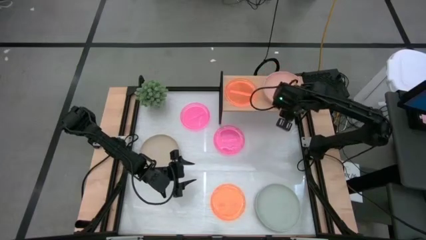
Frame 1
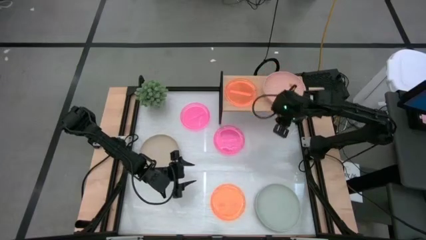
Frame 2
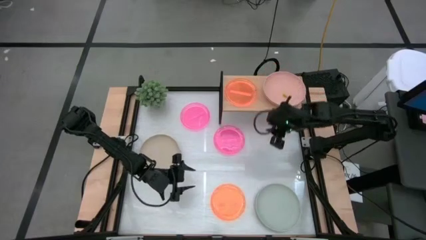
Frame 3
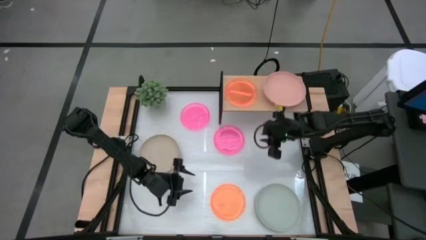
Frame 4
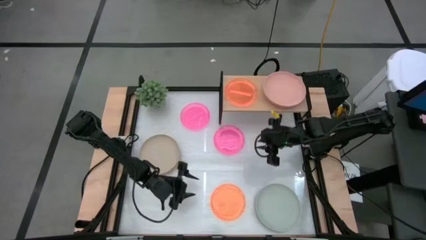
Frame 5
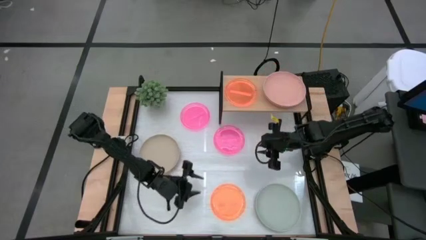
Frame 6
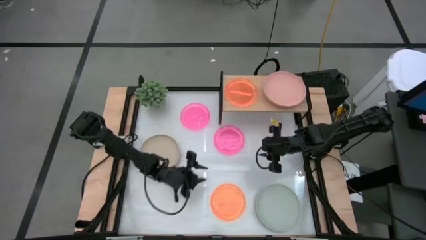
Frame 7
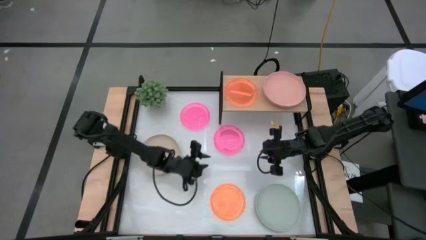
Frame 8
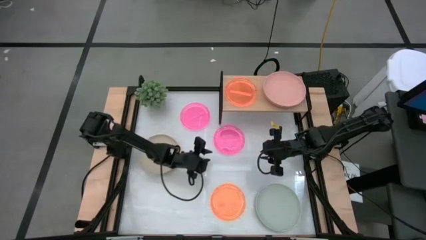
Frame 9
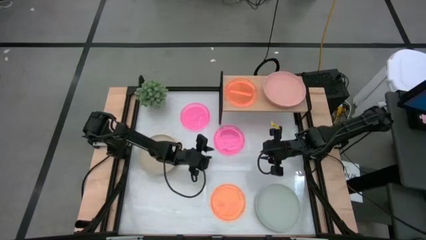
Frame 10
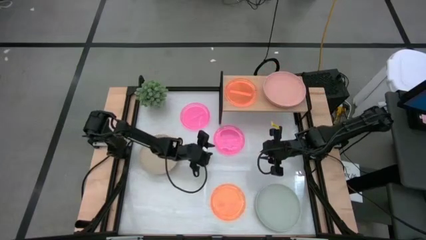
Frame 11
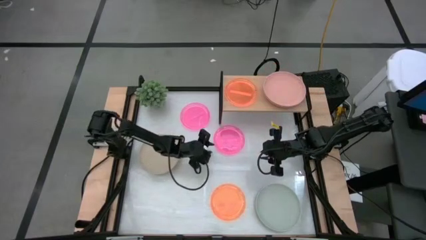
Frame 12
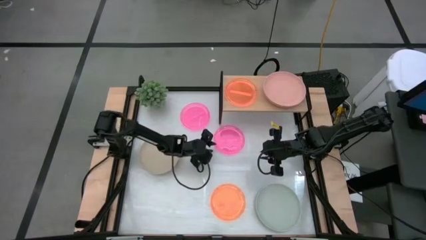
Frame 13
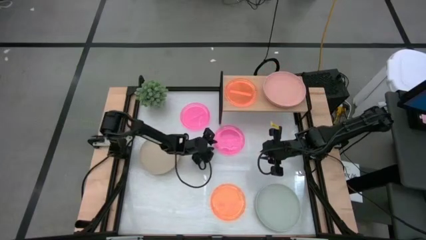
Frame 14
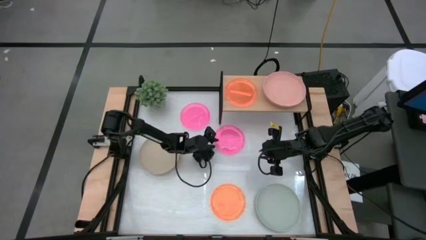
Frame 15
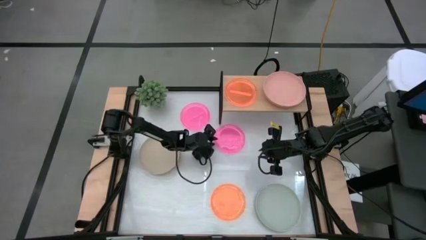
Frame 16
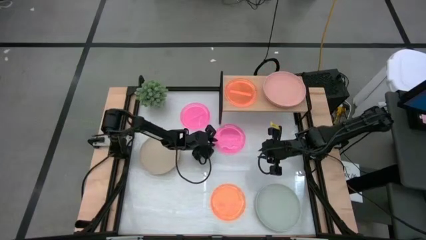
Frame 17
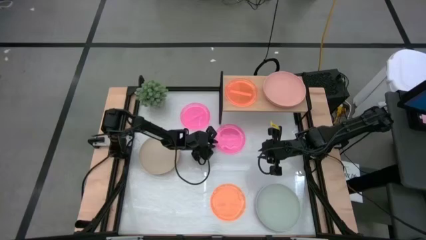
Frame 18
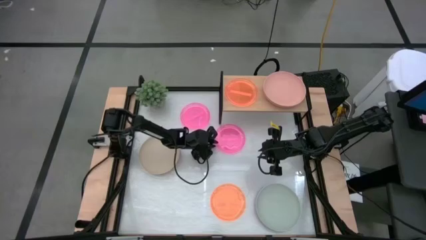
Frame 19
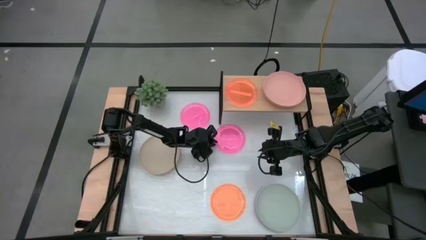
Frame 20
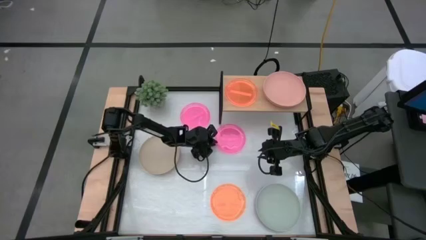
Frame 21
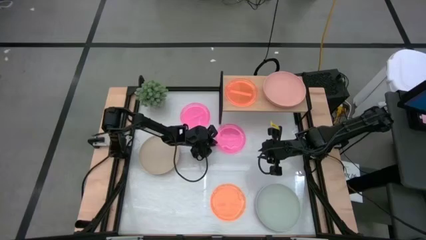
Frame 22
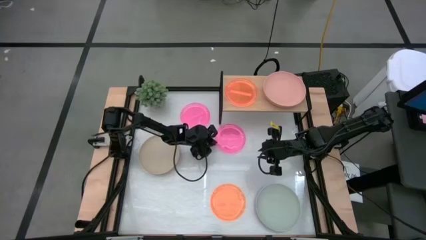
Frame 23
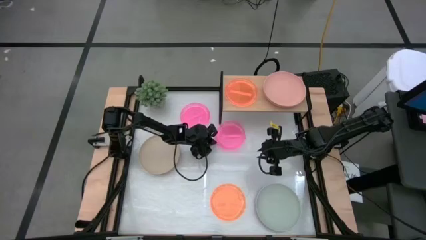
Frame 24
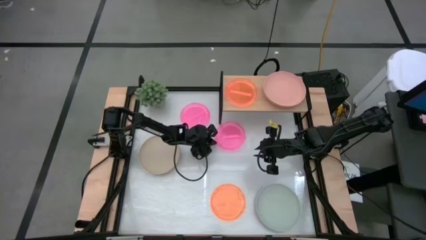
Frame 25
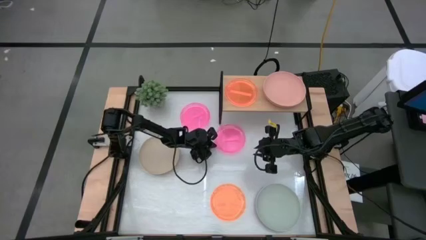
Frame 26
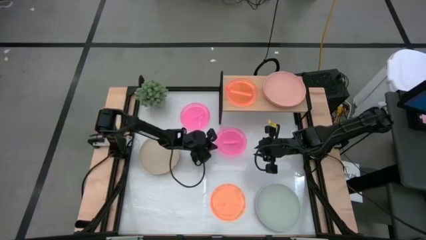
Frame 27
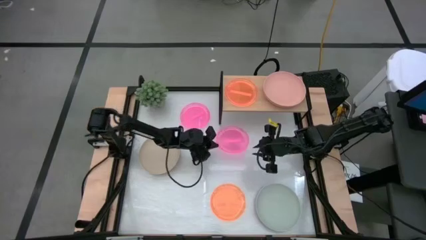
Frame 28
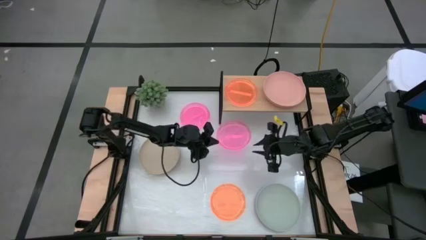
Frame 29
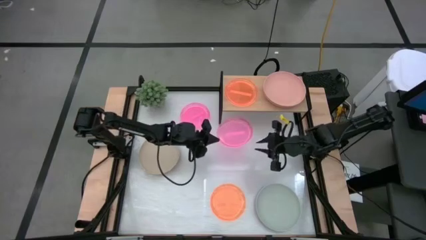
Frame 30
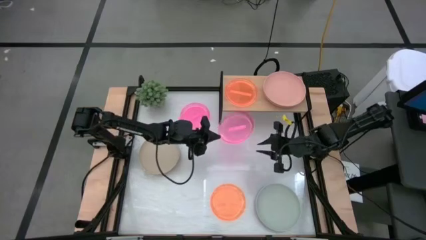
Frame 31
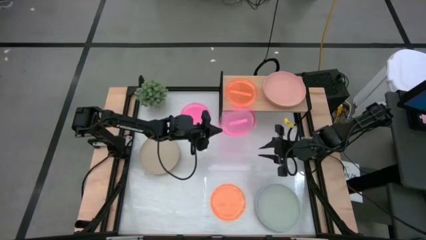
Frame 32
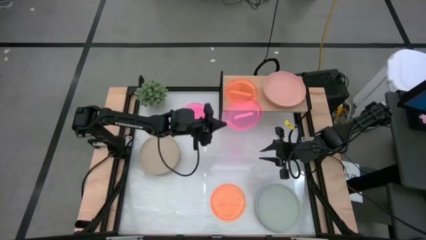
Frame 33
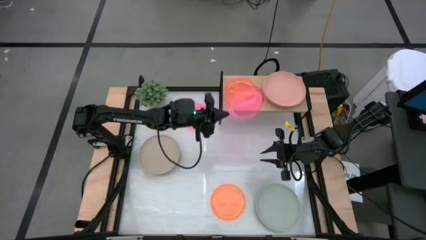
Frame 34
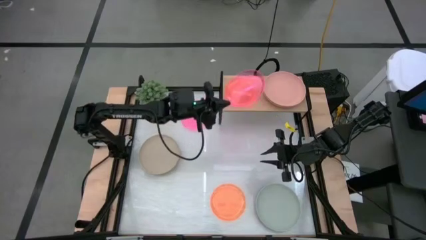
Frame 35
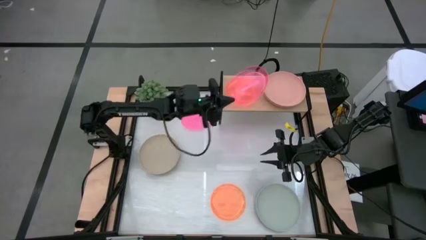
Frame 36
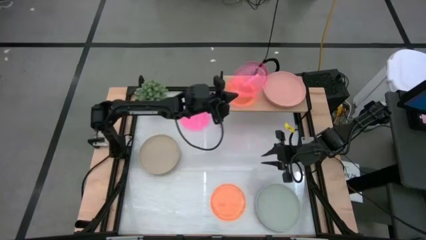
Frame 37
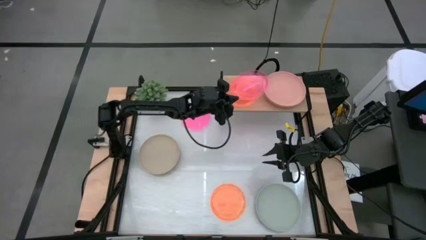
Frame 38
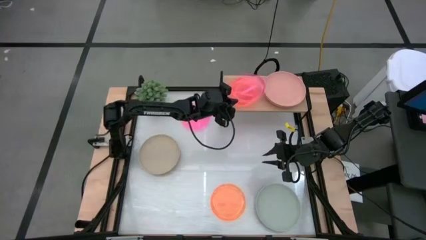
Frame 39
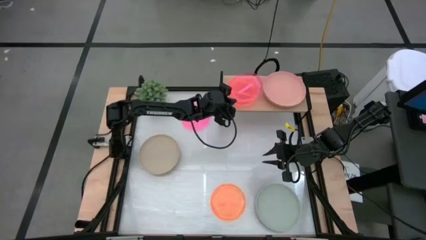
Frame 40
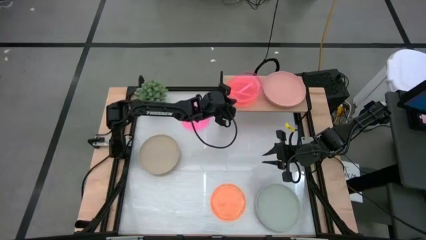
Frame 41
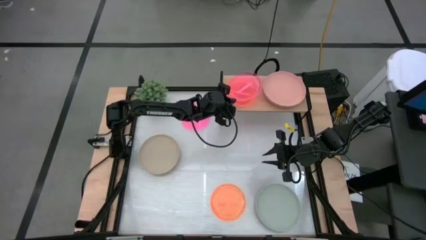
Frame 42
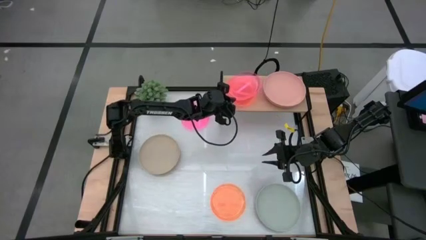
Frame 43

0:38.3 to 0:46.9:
Task: Place and stack plates onto a shelf
Stack the right pink plate on top of the orange plate on the shelf

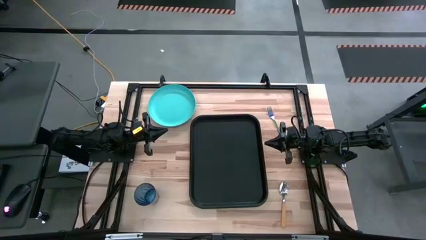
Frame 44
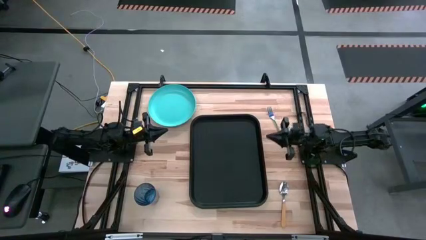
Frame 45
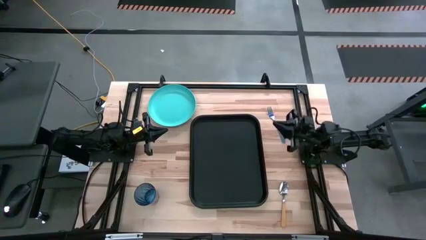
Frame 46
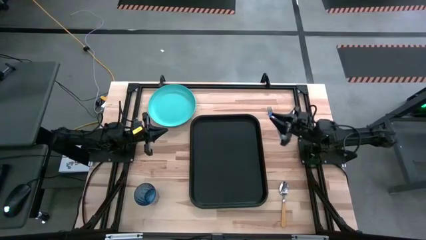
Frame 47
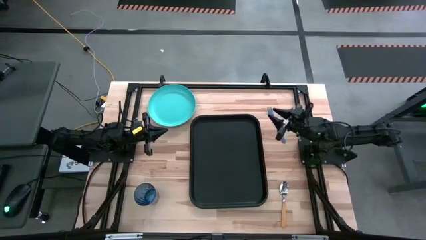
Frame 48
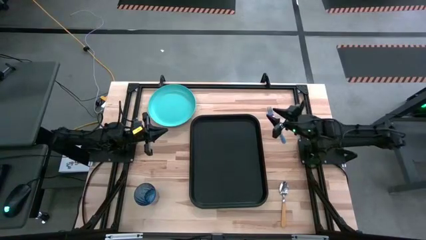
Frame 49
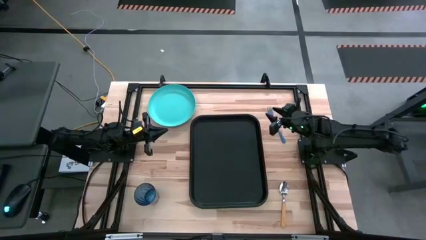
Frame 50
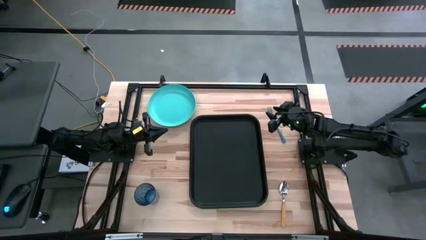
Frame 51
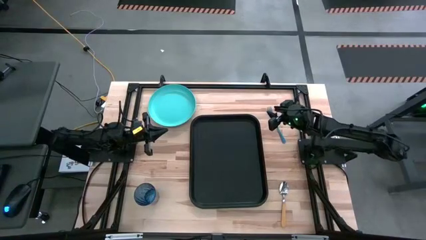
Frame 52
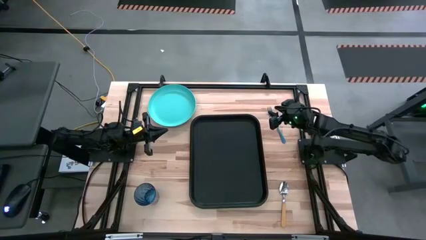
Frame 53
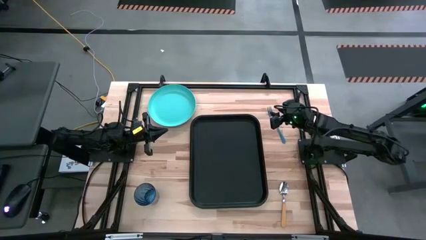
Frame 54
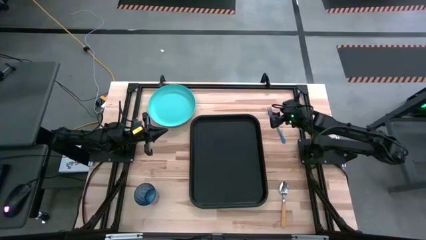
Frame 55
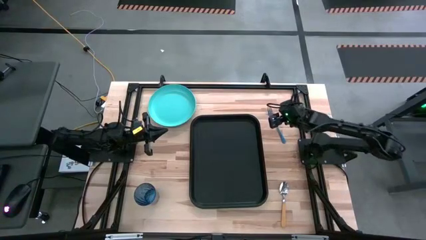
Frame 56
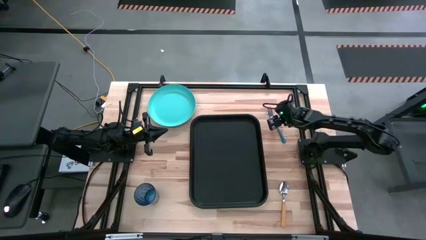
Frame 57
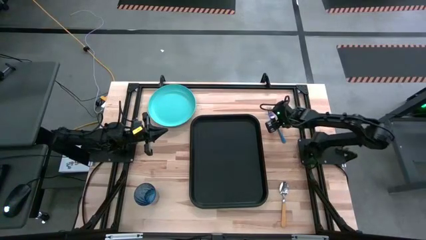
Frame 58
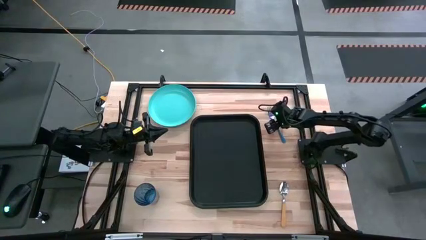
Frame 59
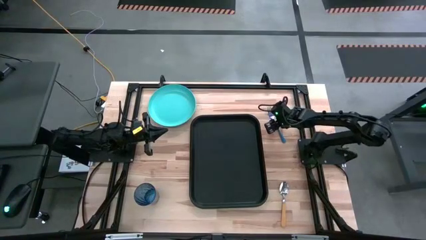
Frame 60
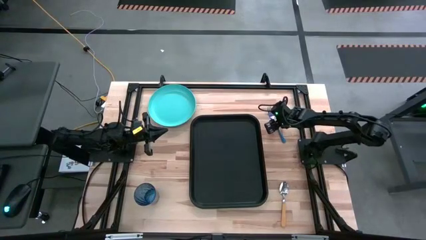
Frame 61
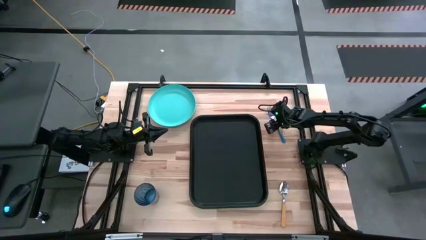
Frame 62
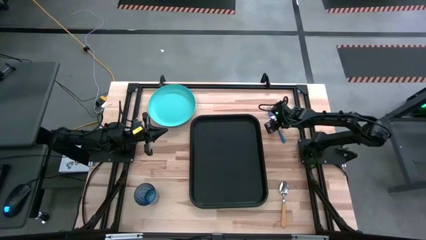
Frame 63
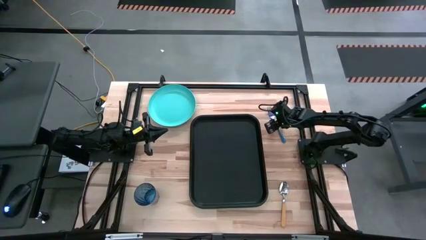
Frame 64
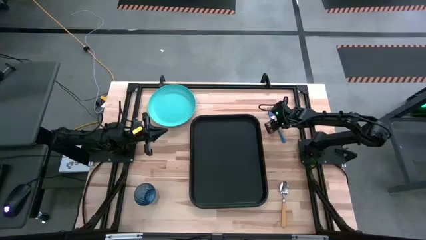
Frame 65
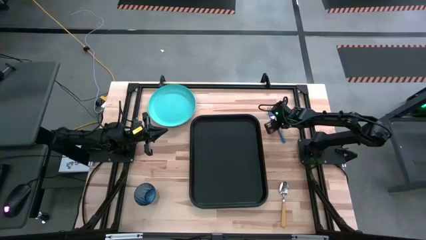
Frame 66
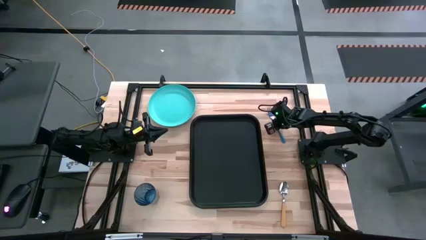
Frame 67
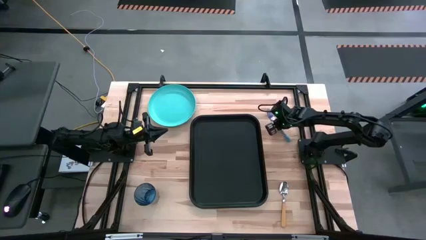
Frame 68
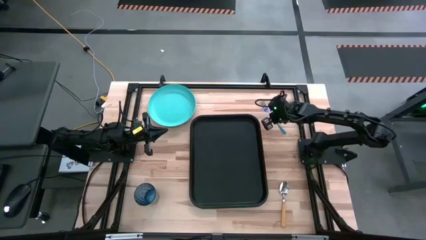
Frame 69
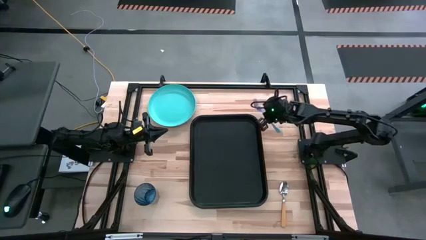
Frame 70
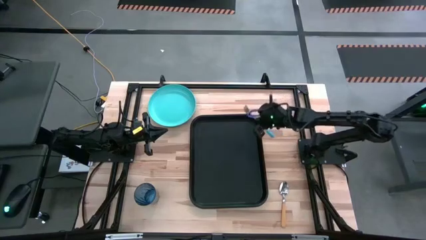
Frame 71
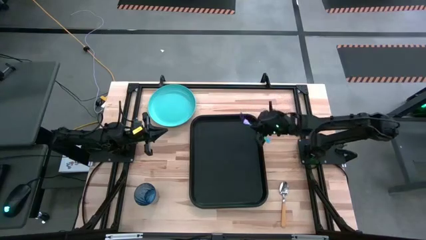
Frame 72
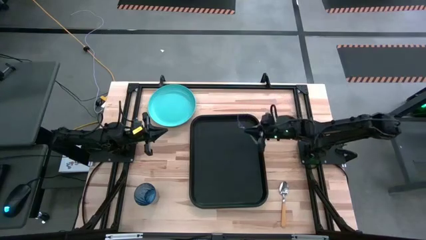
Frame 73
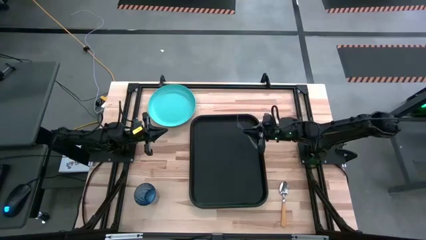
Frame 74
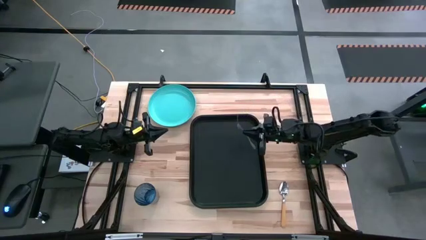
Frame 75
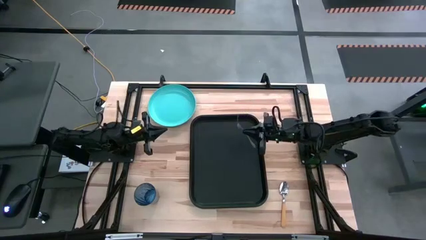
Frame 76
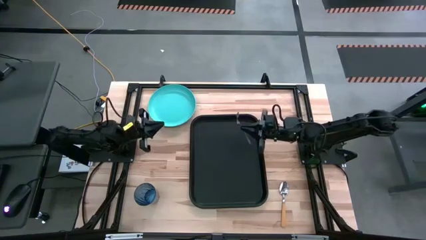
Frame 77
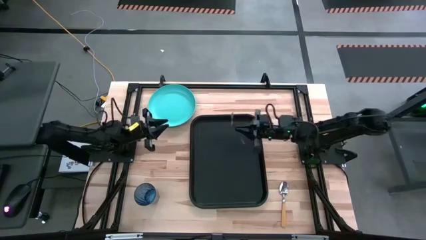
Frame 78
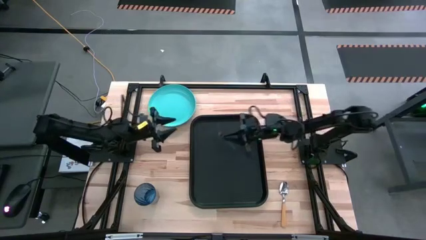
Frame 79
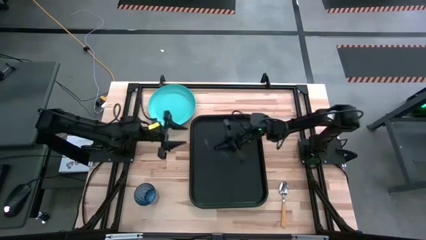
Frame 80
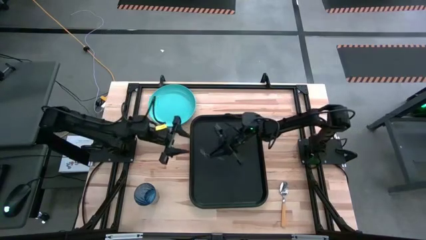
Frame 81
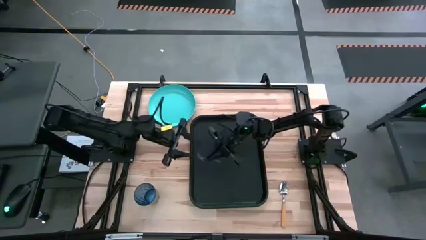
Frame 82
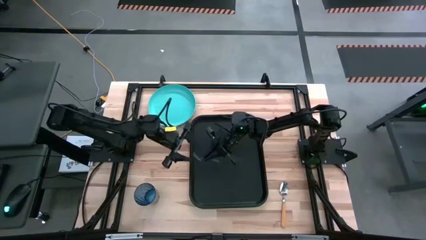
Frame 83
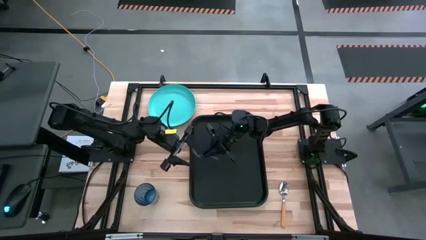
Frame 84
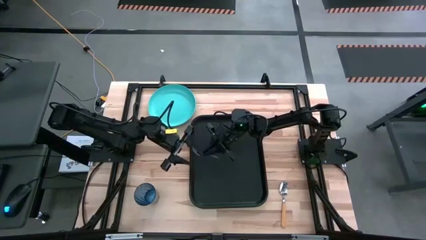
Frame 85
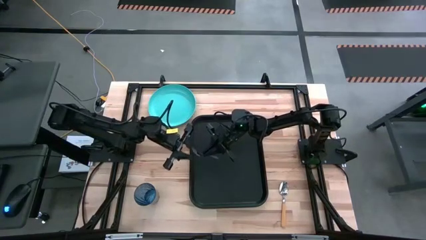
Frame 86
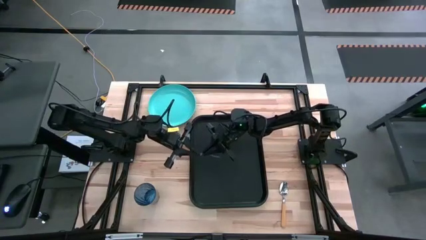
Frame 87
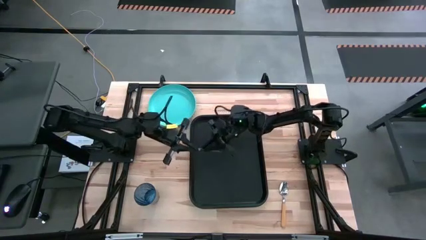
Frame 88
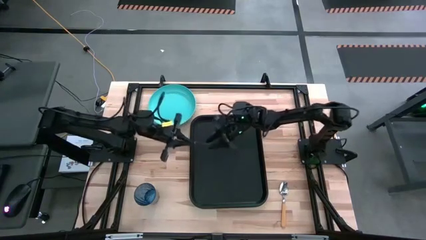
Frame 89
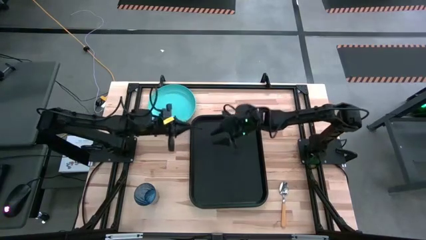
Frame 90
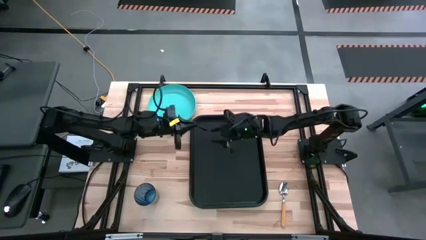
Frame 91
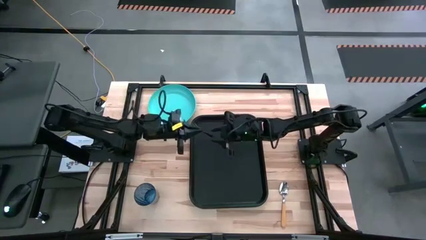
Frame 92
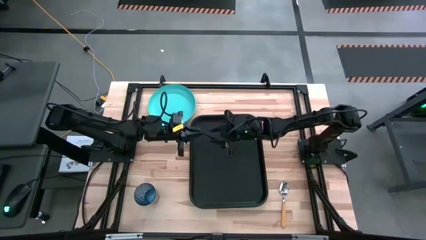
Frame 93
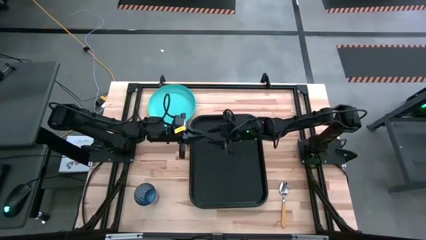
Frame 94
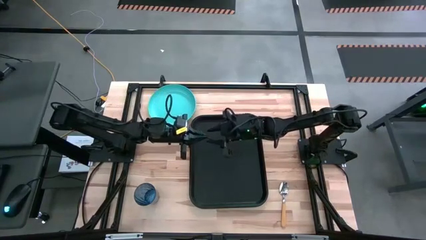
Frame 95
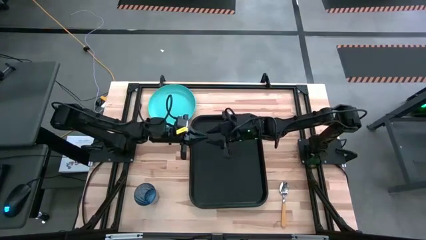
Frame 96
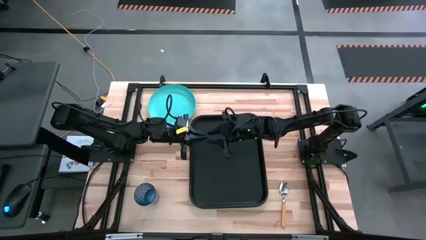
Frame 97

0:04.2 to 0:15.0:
Task: Pick and place plate/cup/fork/spoon on tray
Put the blue fork on the left side of the black tray
